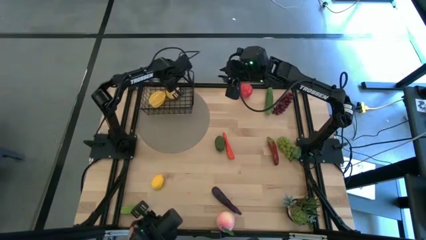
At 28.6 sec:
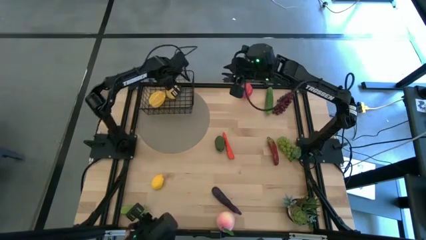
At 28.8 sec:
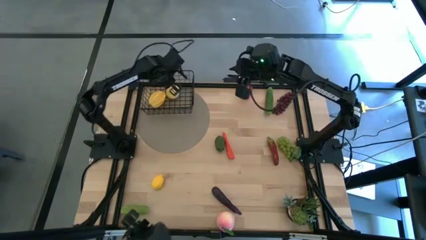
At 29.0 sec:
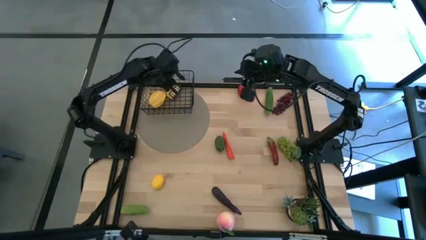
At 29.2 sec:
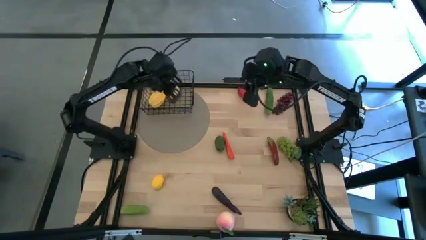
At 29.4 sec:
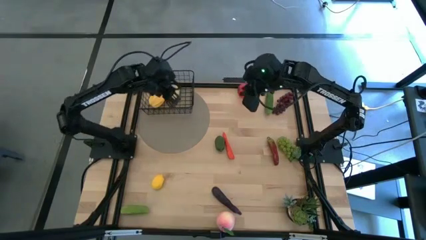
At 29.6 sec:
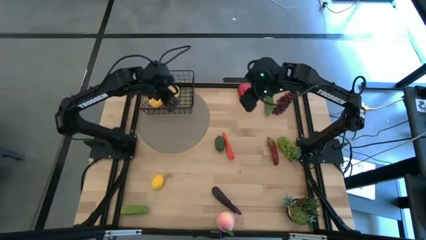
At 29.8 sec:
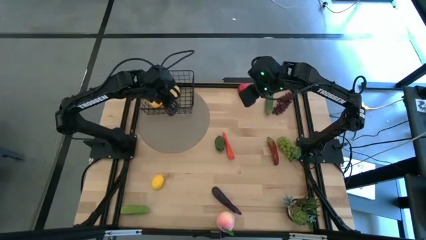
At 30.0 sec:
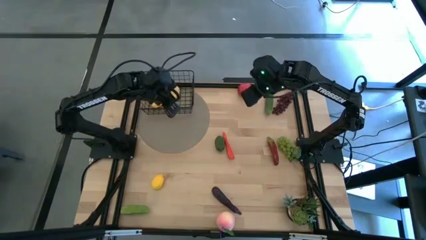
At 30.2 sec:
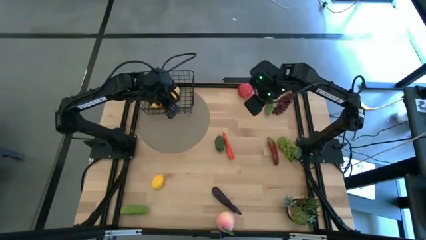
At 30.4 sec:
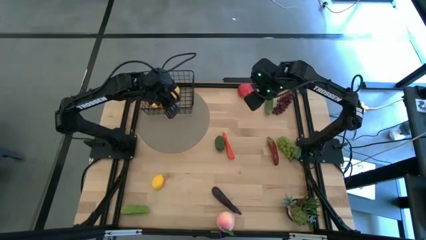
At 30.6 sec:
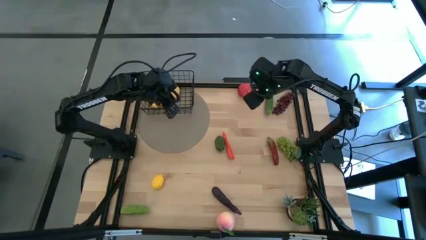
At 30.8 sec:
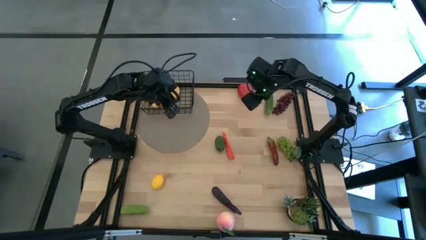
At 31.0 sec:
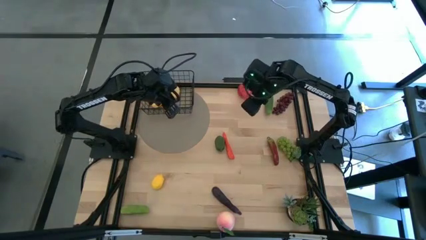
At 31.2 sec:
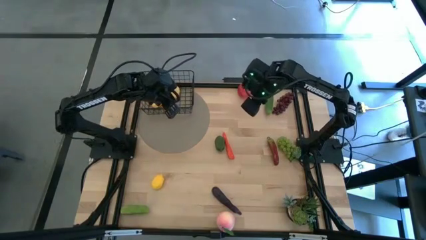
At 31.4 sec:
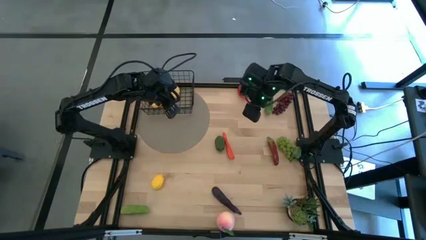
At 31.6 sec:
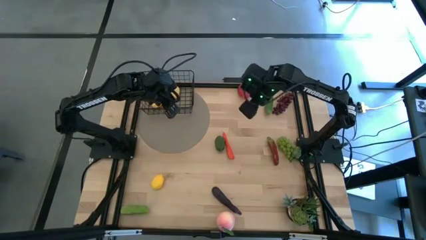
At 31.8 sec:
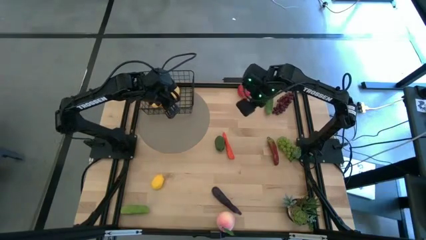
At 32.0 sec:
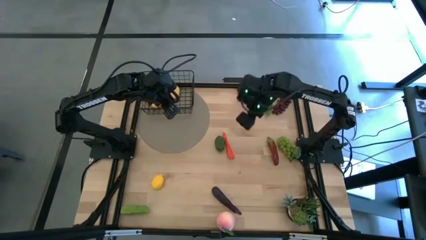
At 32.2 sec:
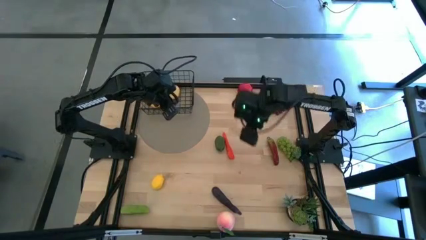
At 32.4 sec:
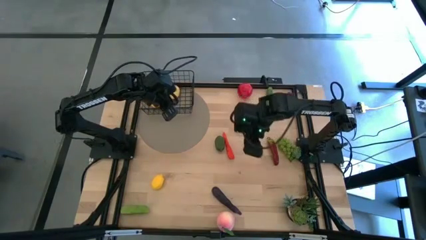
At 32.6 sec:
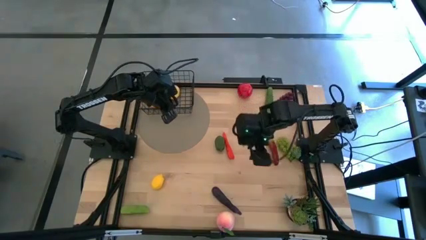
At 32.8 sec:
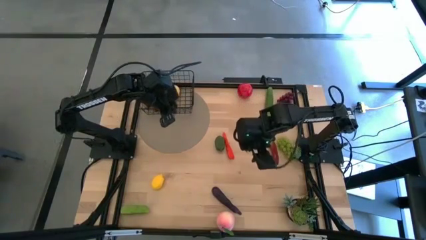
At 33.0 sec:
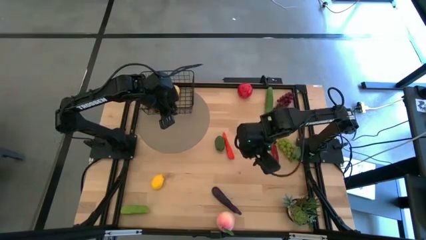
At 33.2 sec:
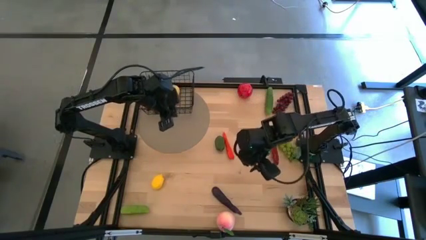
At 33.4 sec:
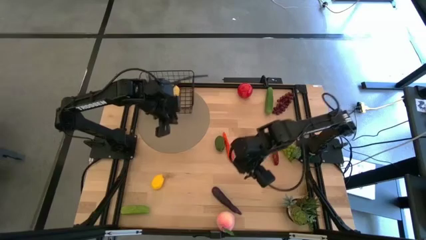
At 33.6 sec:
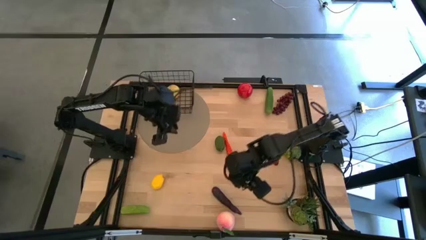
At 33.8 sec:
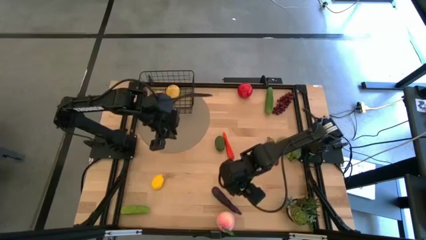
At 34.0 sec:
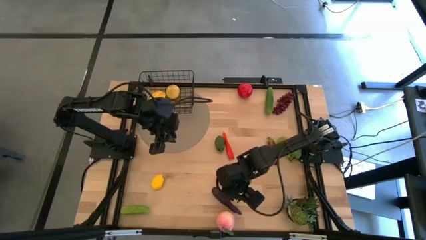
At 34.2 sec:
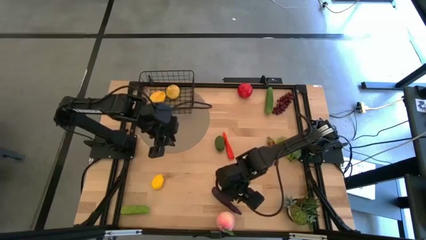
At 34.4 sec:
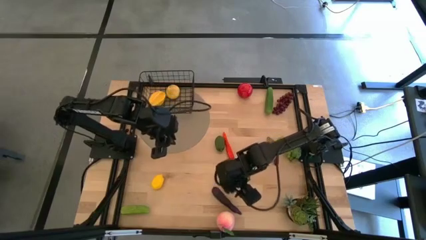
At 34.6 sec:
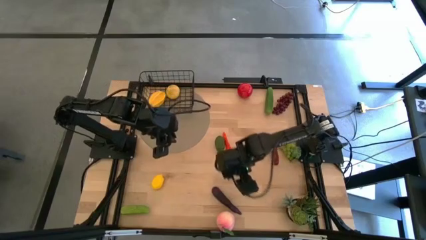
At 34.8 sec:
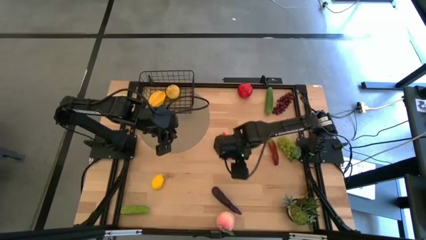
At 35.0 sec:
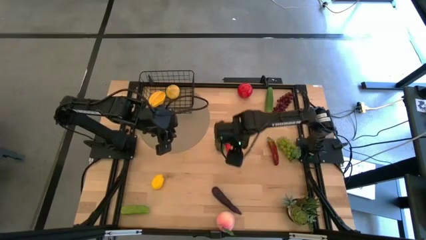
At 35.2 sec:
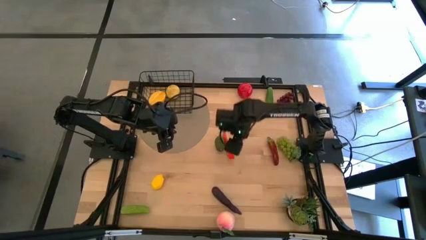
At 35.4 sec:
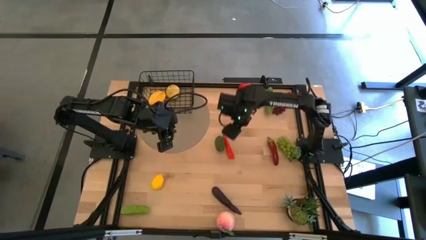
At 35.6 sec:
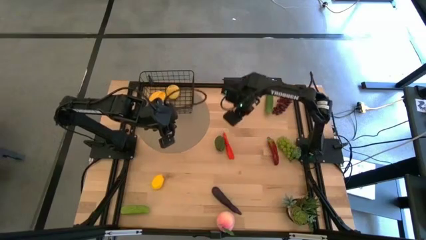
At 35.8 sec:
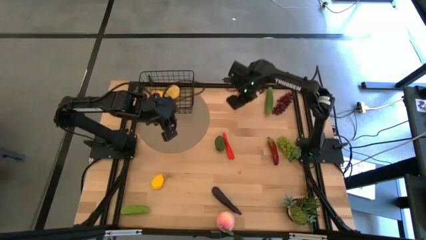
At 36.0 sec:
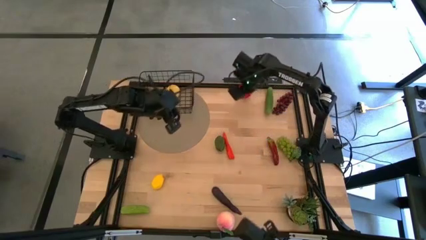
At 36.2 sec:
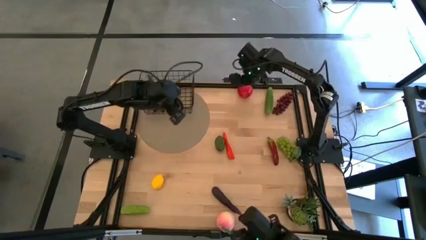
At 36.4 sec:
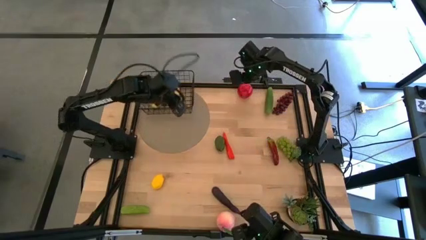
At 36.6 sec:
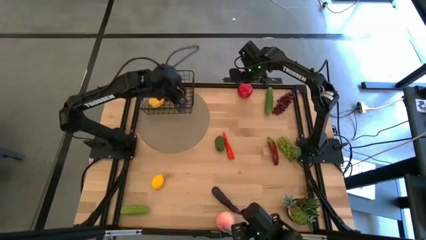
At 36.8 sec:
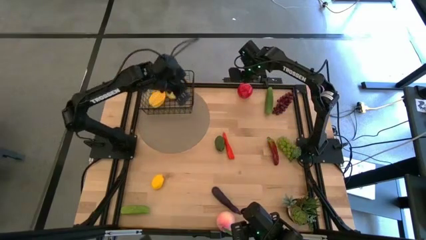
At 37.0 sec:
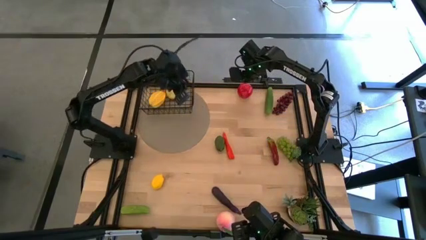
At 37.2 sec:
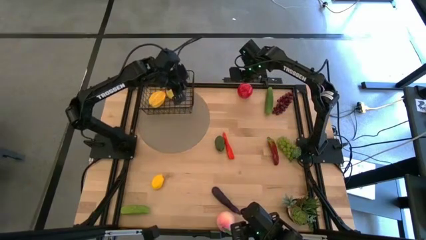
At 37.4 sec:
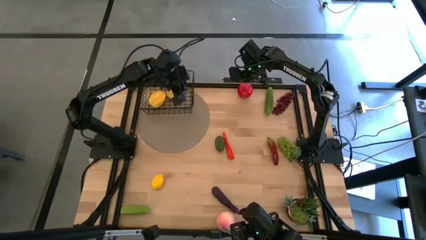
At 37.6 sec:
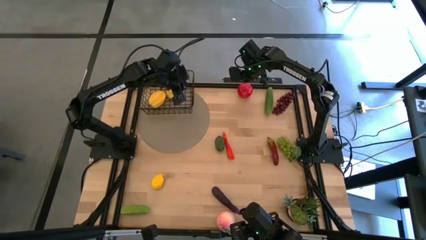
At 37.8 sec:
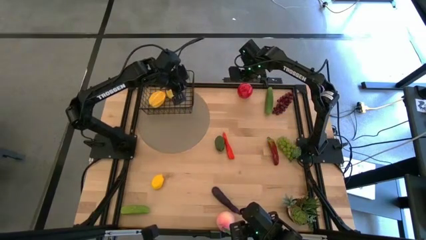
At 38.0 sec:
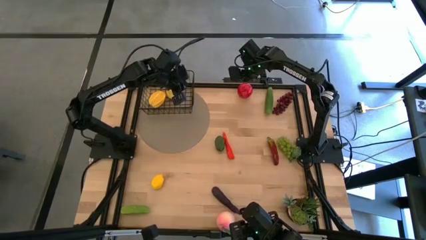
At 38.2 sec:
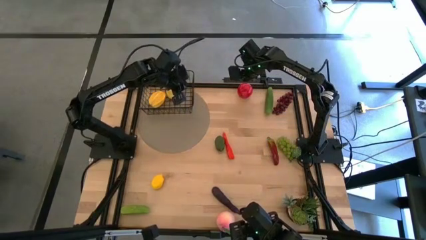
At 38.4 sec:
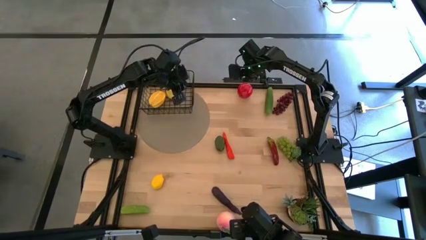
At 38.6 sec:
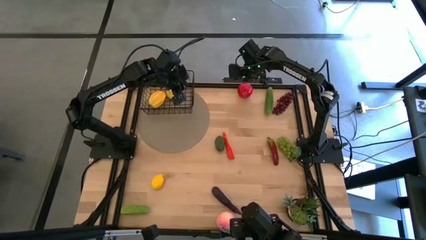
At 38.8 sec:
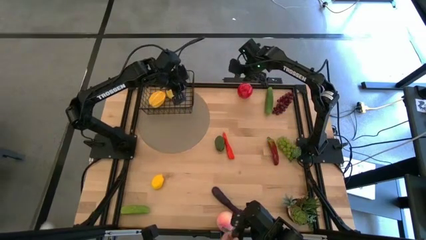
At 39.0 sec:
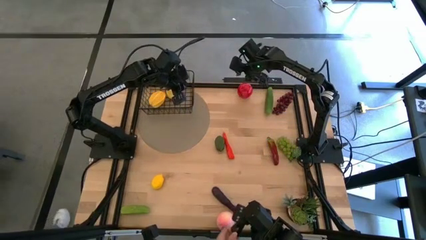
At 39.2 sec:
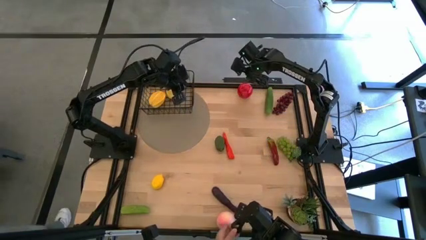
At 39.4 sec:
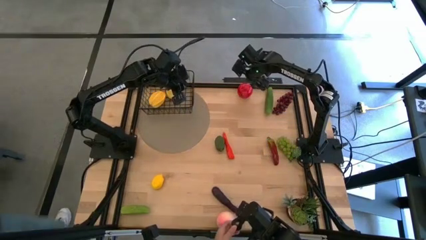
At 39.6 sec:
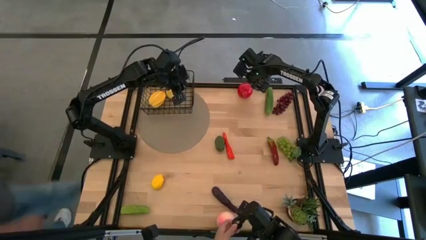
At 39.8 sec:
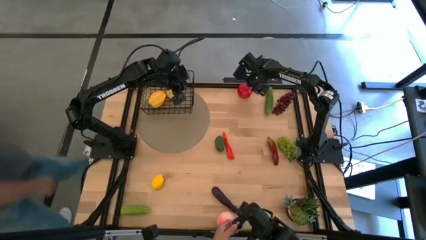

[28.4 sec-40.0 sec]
Task: Build produce basket
Put the red apple into the black wire basket

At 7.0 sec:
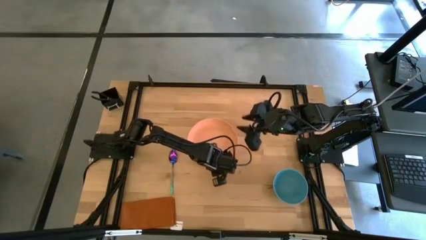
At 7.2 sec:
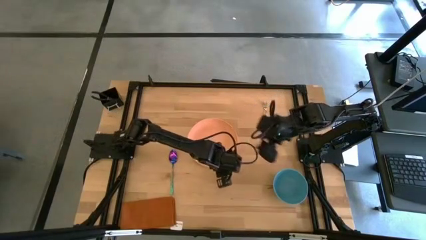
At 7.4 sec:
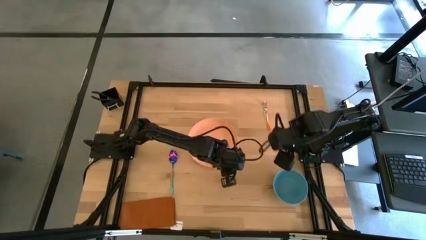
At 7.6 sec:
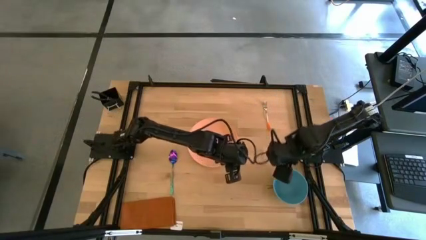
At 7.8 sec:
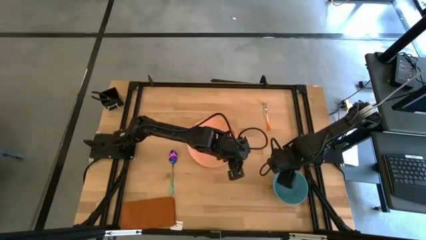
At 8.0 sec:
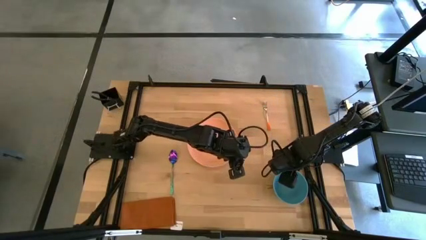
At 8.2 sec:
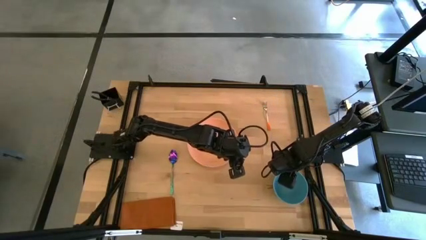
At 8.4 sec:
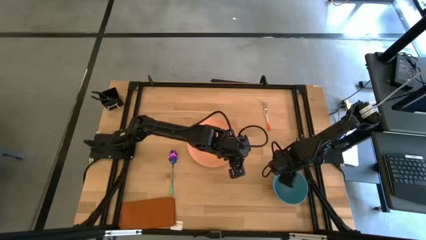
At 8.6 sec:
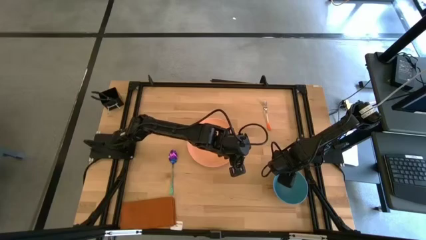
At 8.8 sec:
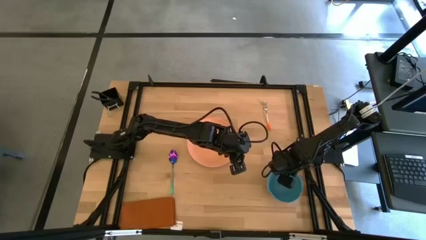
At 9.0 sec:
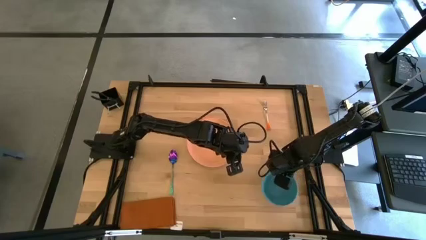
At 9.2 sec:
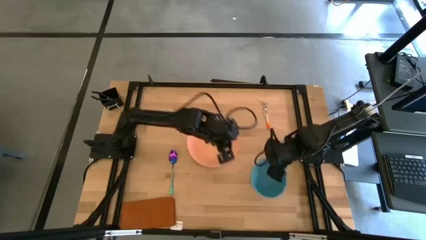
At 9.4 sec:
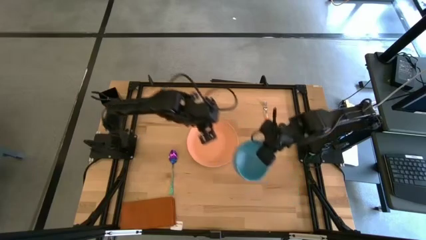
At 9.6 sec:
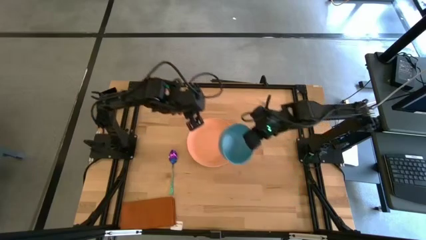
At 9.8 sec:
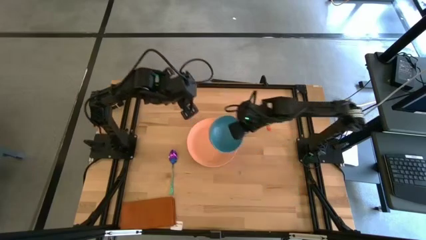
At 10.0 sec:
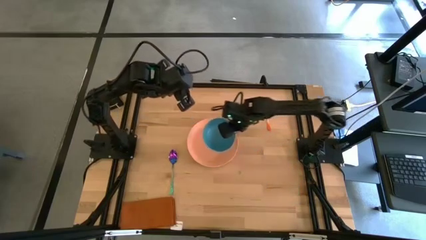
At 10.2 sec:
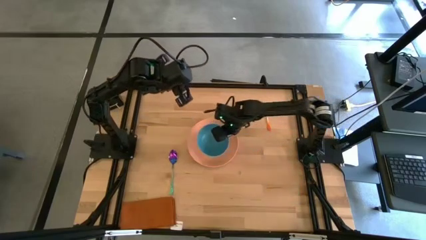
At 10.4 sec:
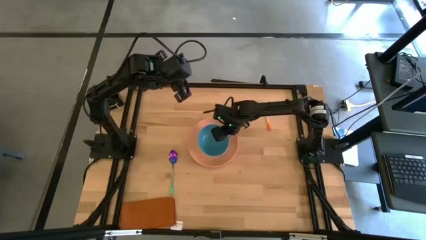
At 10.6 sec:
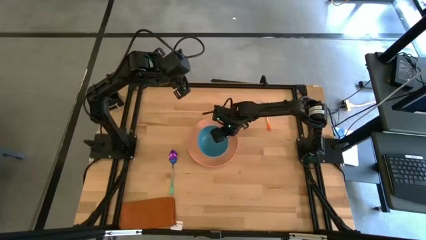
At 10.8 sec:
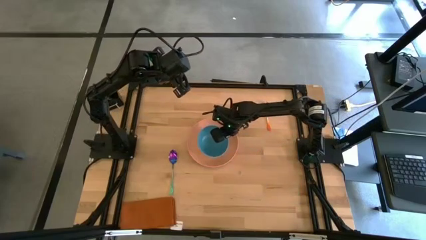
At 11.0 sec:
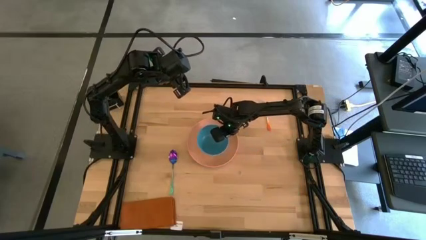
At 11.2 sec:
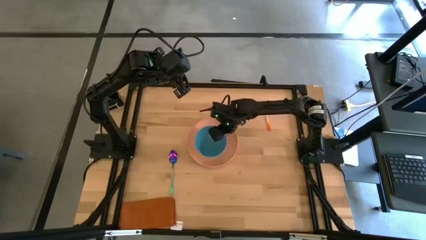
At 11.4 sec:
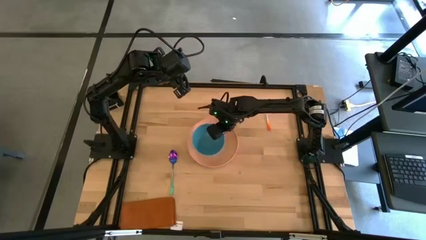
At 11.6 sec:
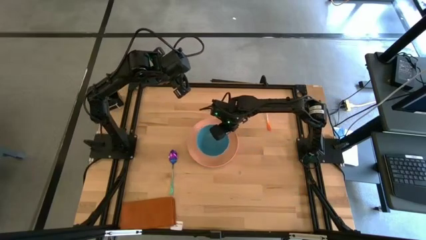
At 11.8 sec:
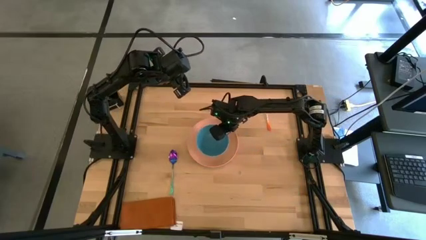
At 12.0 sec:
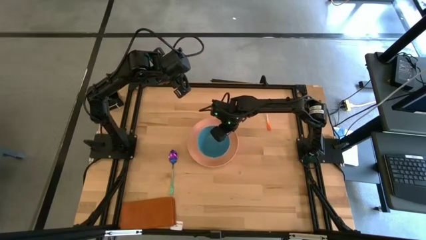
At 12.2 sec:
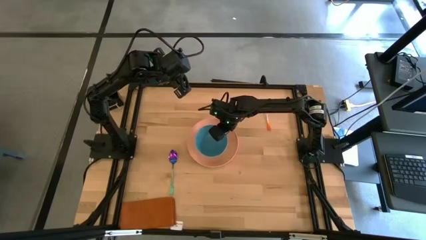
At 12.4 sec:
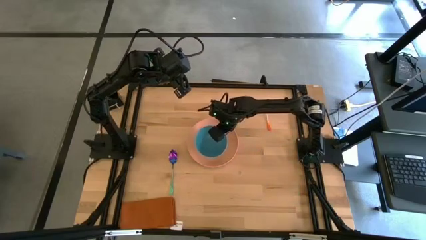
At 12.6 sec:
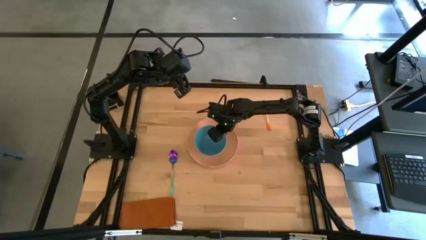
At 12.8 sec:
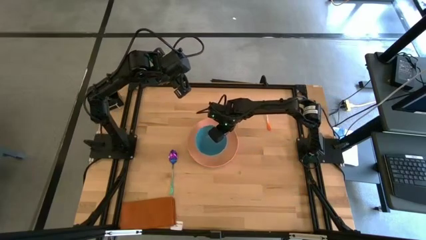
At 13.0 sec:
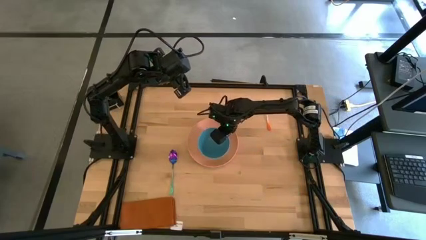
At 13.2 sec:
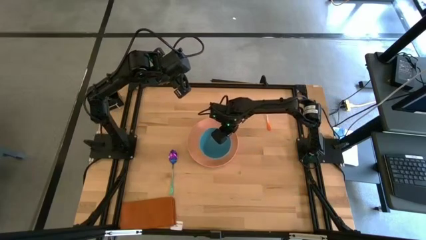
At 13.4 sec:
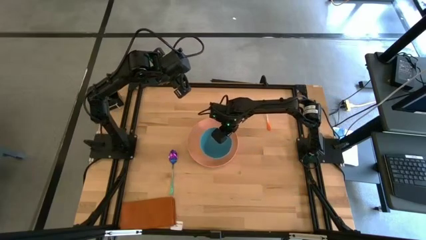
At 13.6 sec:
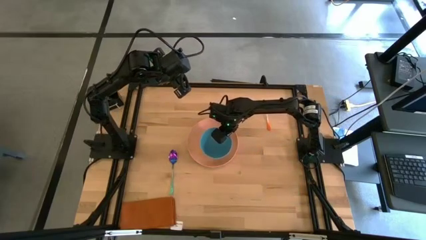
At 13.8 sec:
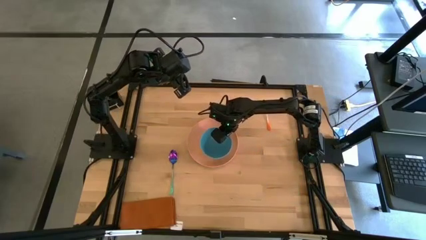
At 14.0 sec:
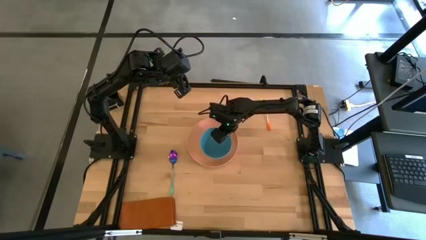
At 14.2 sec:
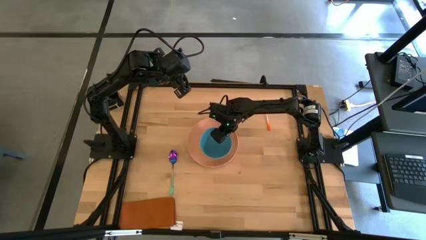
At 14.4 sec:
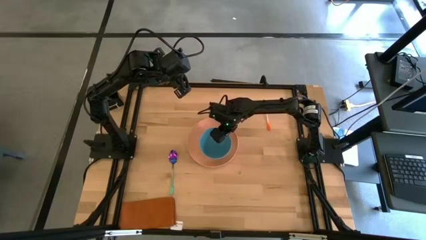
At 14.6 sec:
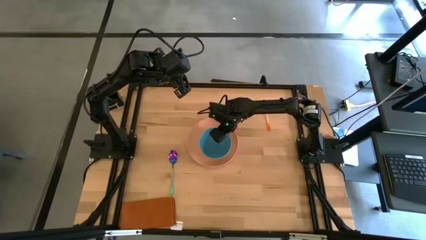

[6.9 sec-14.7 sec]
Task: Set table place
Put the blue bowl on top of the orange plate
